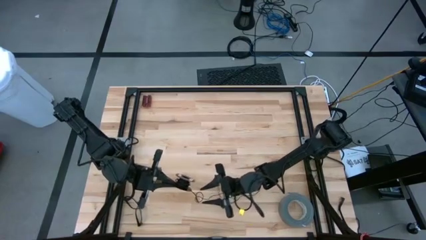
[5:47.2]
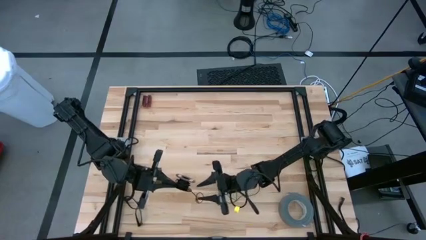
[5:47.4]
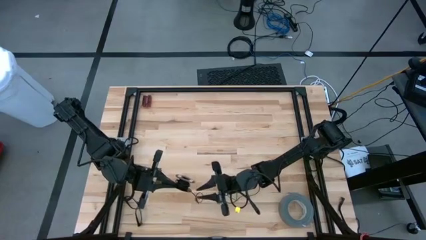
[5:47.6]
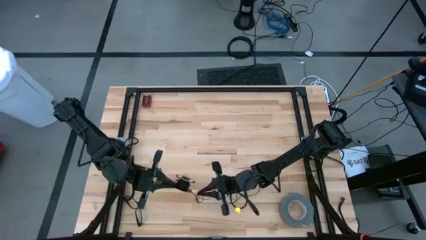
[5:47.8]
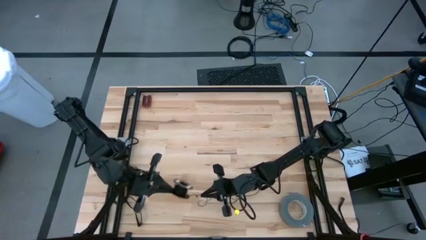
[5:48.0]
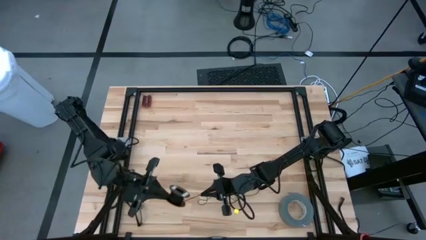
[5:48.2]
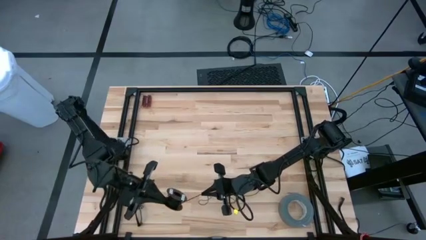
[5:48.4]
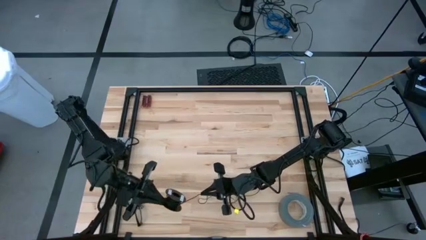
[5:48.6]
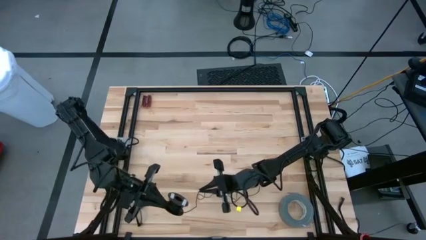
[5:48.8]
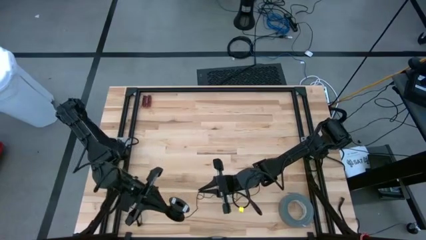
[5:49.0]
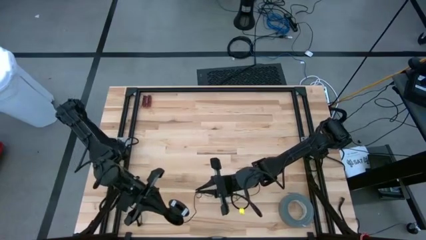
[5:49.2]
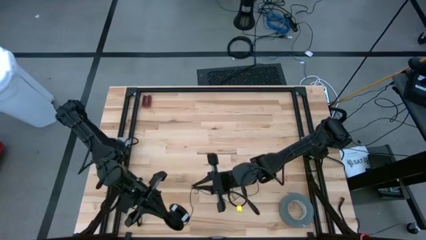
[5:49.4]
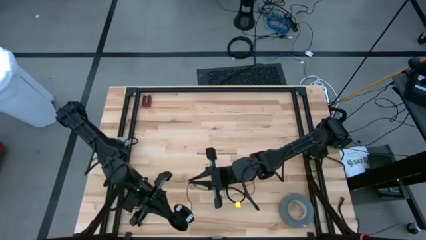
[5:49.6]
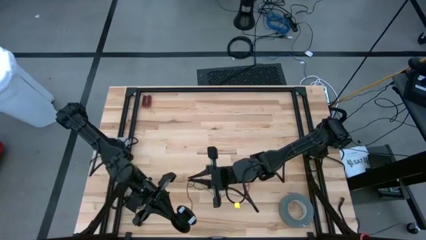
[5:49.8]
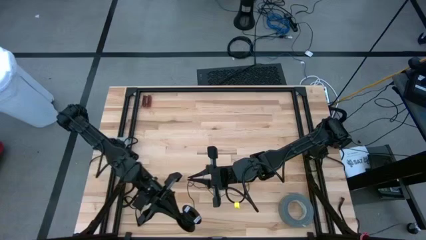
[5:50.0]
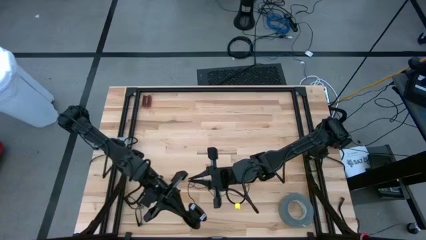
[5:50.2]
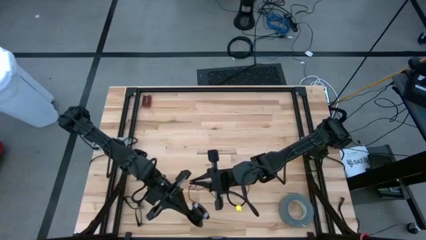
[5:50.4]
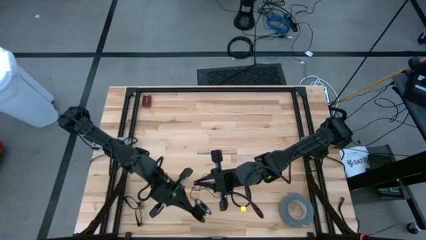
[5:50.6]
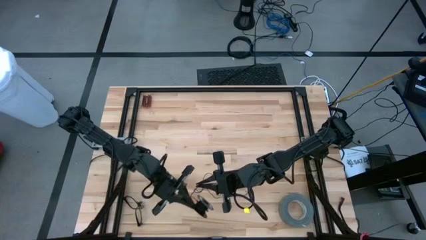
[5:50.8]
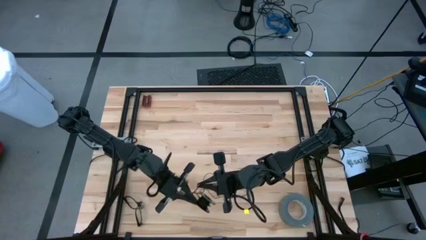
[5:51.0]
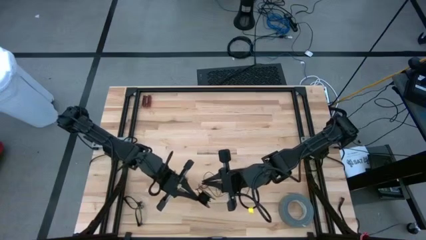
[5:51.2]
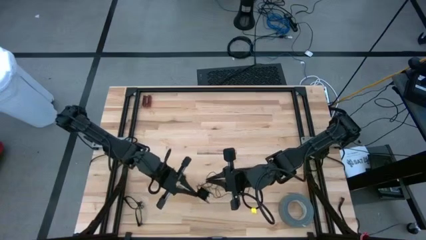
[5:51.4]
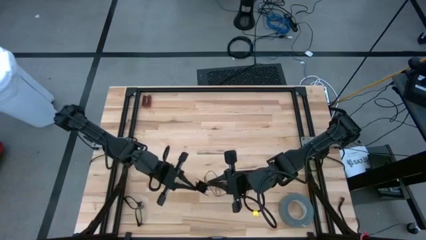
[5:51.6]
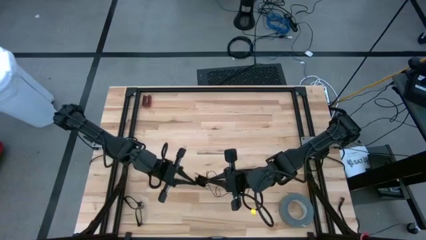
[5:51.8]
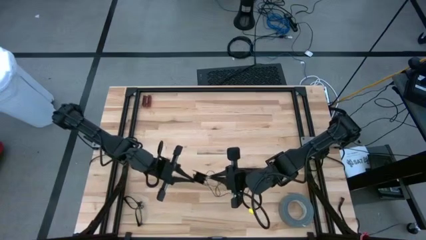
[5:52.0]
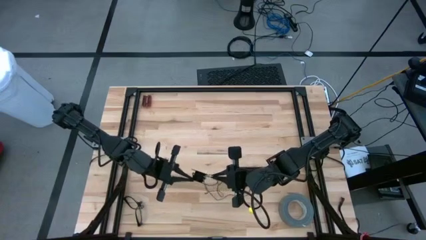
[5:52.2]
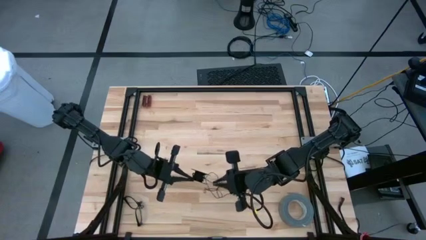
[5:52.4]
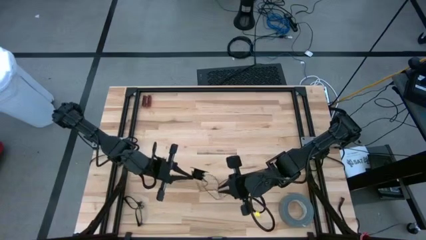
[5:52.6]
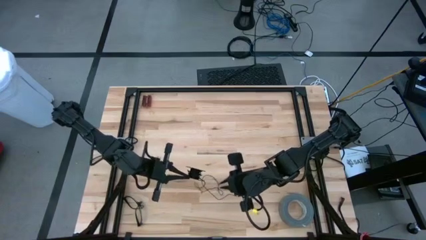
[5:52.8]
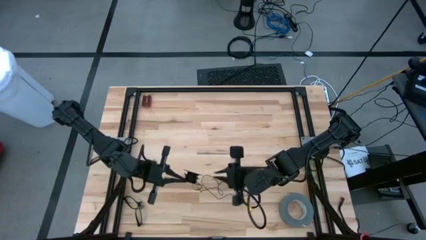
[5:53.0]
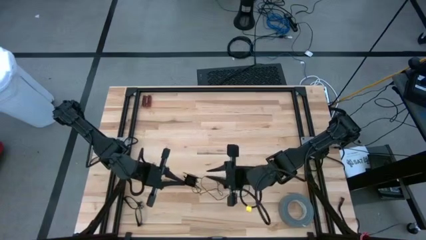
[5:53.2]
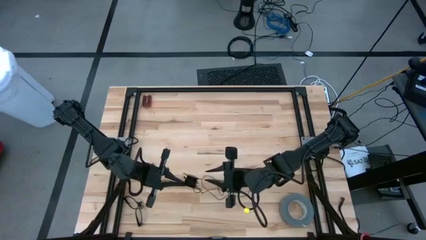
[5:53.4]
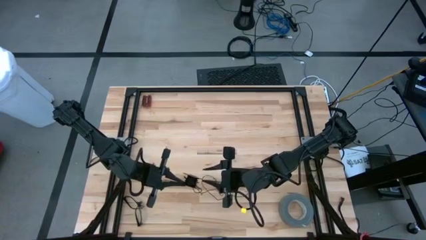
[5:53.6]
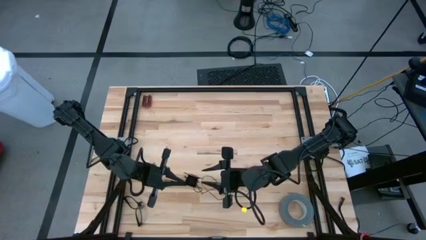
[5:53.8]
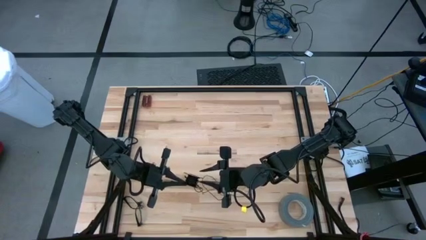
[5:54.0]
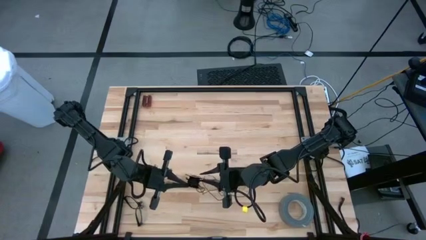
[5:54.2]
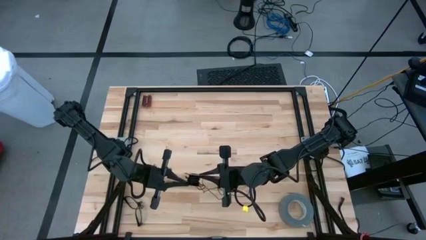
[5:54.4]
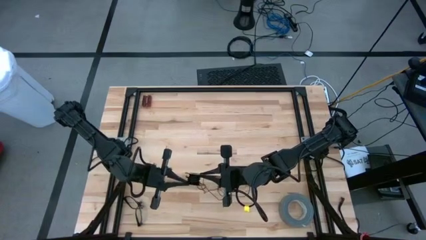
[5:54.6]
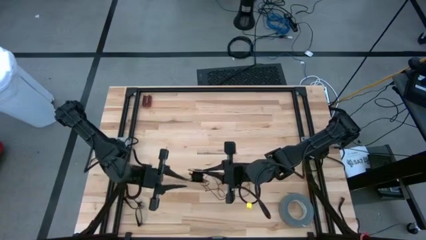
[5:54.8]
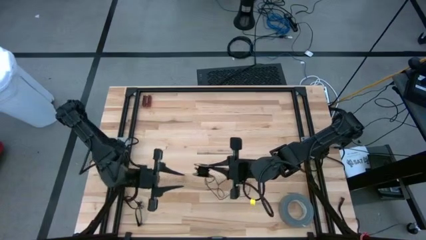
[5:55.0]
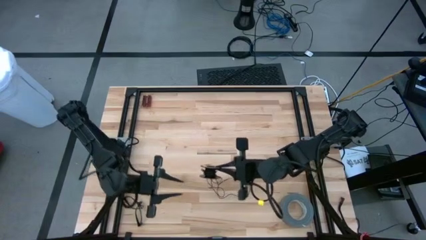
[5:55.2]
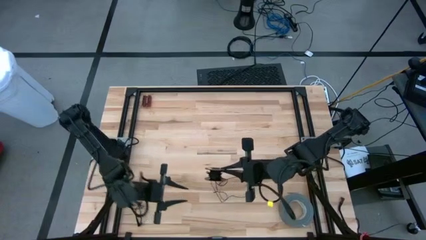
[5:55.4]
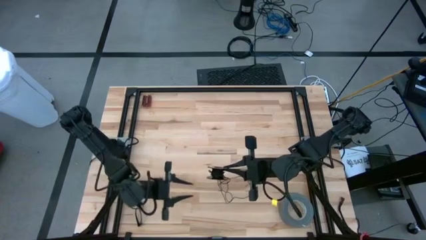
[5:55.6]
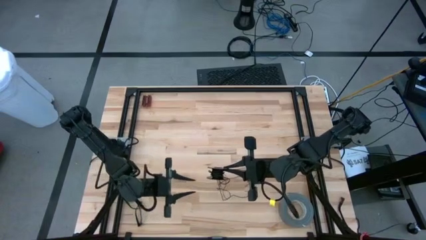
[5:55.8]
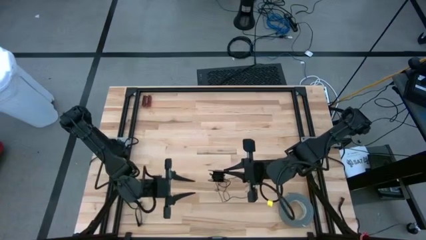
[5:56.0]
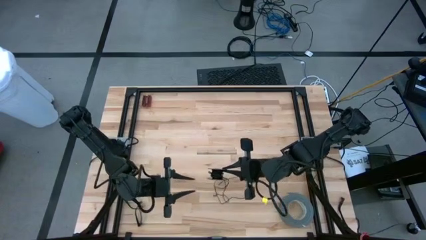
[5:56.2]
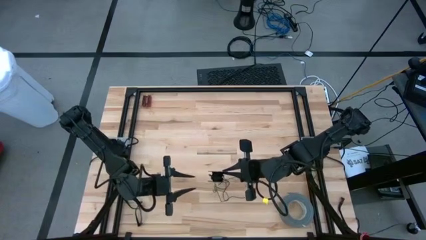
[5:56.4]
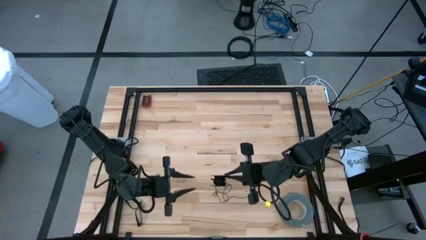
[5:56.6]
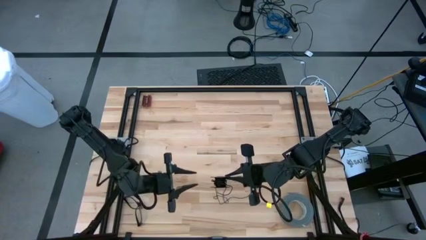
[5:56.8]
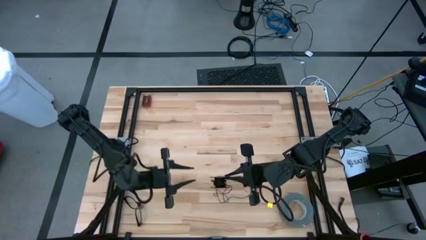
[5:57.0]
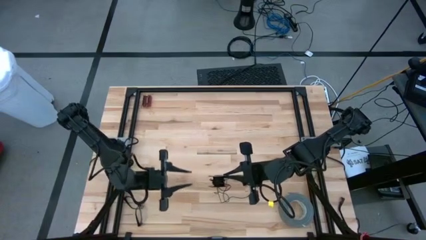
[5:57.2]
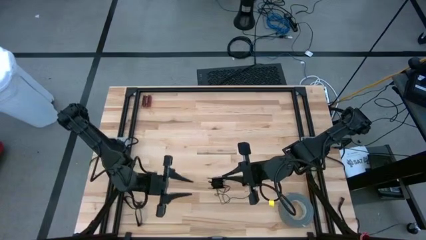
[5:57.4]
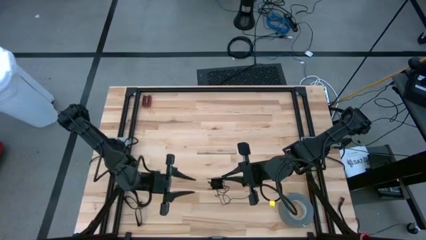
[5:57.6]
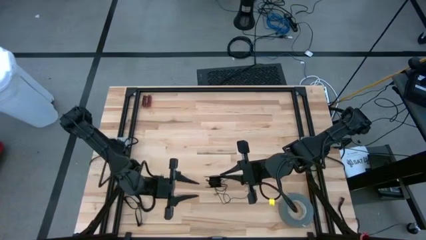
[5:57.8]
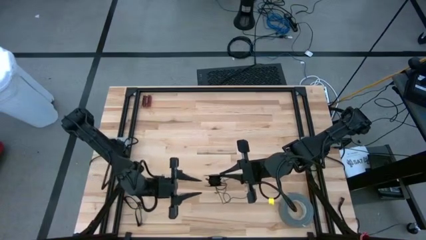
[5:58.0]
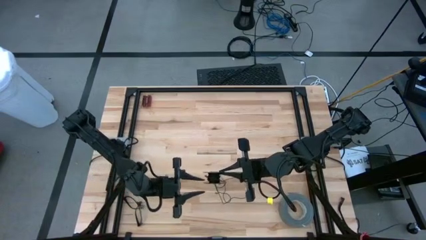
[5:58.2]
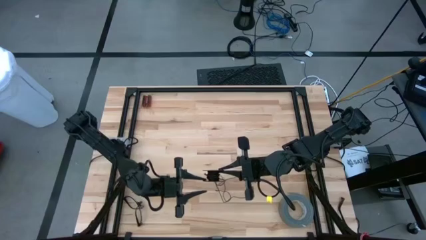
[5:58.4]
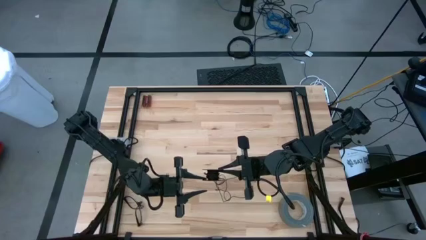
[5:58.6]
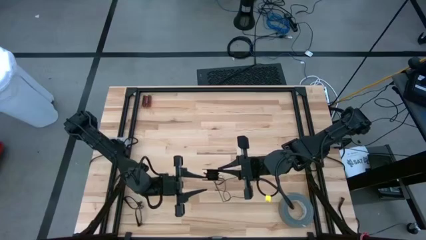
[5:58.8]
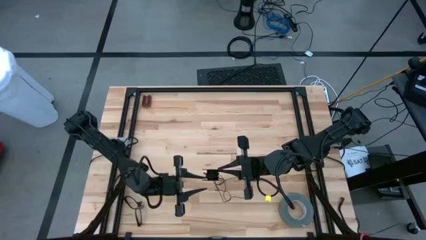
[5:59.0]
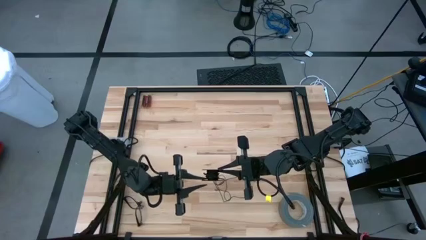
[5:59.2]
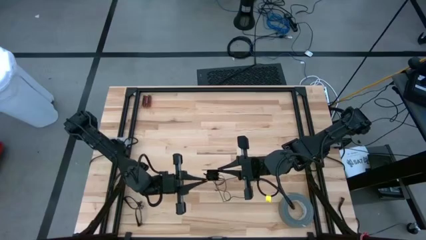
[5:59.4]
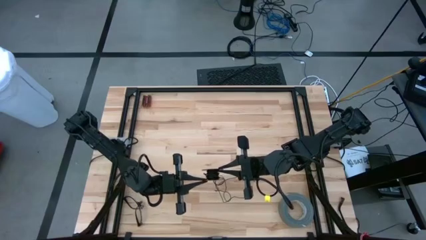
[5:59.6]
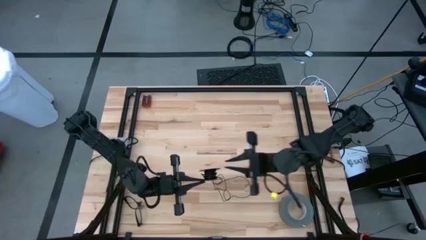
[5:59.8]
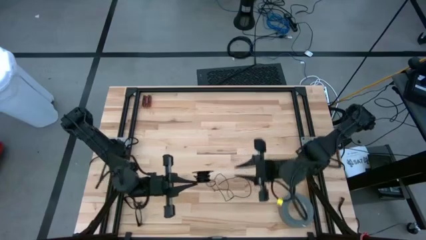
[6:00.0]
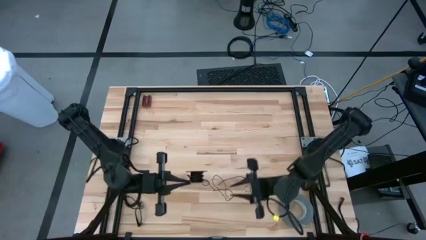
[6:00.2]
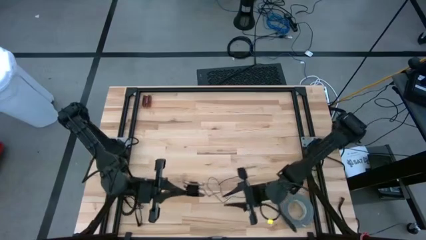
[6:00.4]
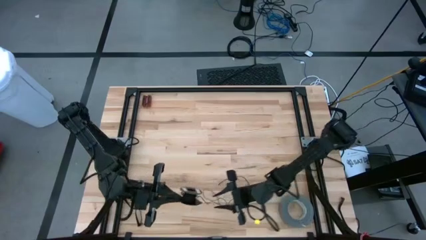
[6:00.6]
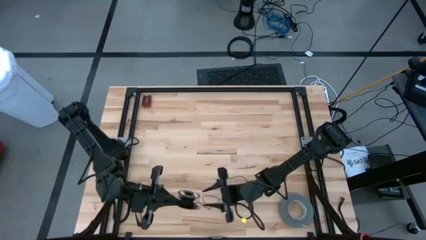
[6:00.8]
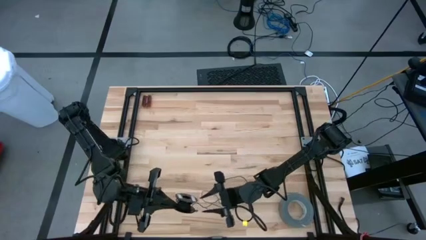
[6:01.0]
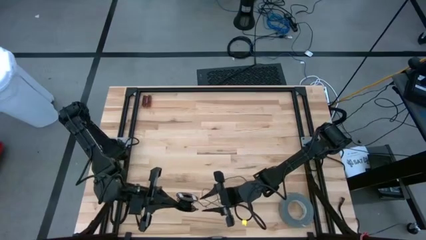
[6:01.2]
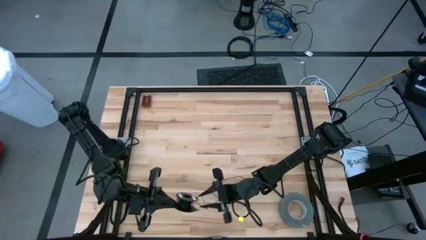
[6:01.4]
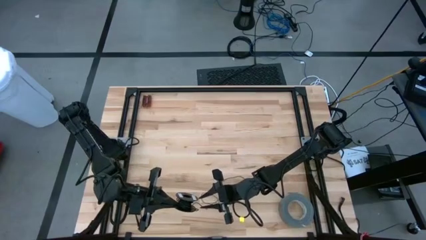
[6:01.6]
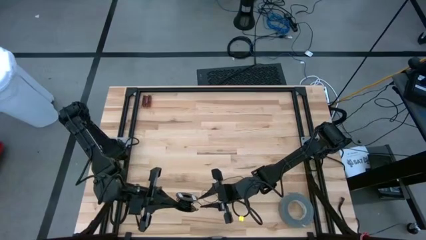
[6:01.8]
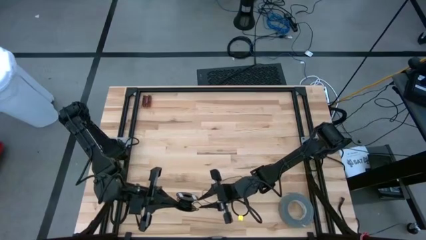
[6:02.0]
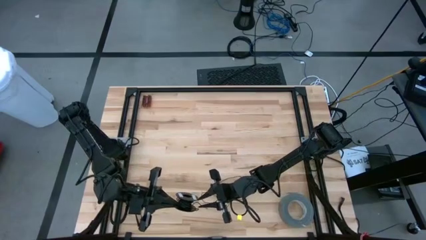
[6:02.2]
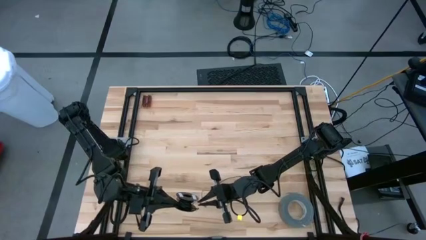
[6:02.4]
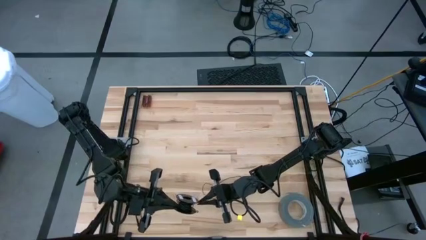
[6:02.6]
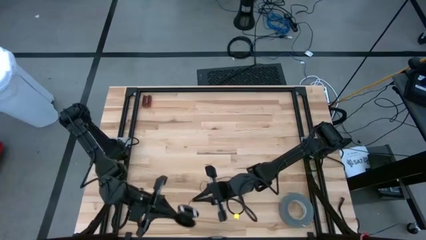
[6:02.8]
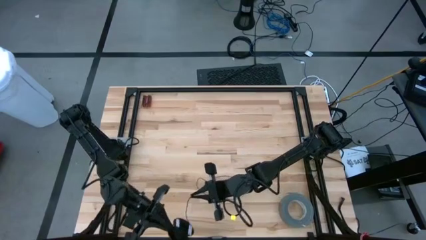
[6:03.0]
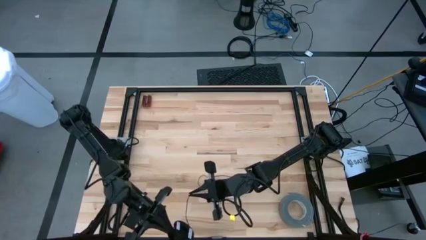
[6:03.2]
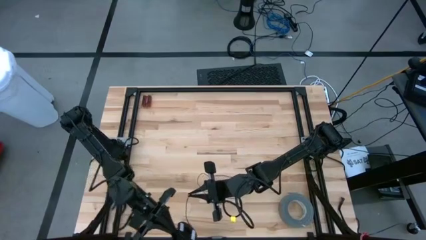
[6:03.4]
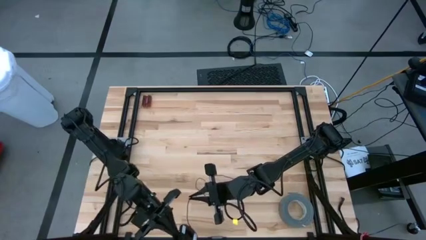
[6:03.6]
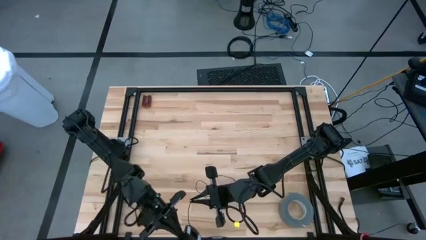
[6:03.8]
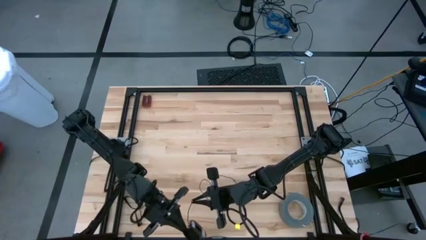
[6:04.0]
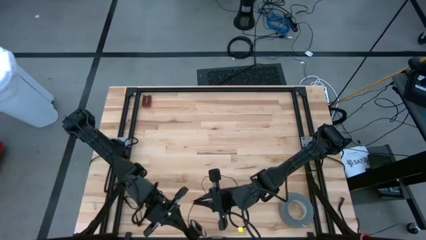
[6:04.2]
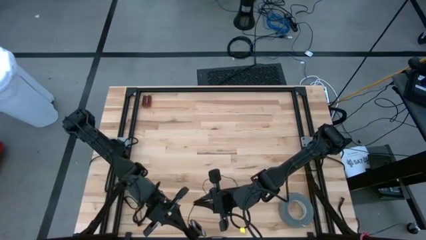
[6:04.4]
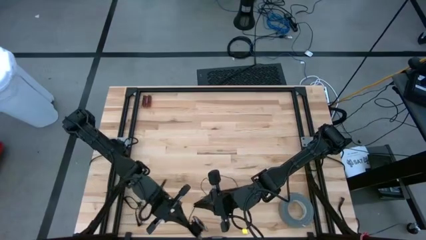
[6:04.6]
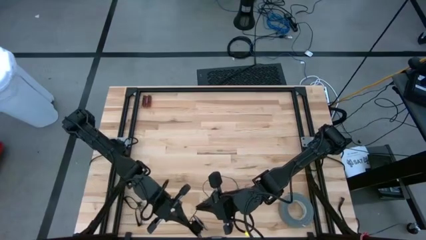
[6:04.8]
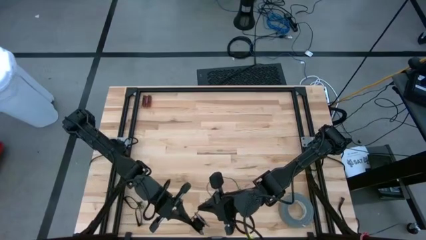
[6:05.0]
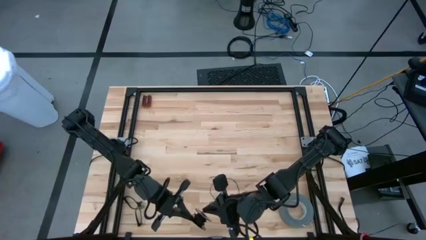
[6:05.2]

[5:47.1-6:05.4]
Task: Coil cords
Coil the black wire on the spool
